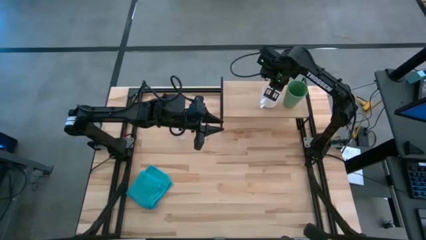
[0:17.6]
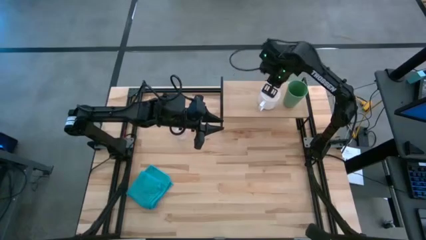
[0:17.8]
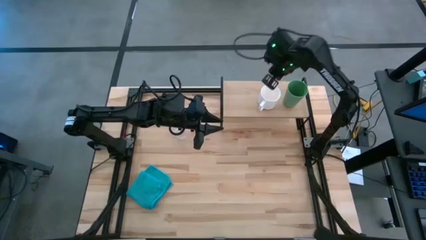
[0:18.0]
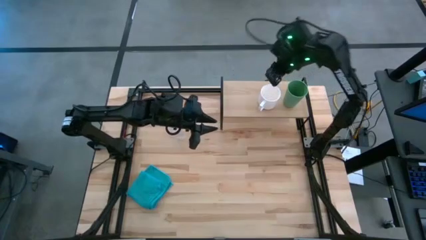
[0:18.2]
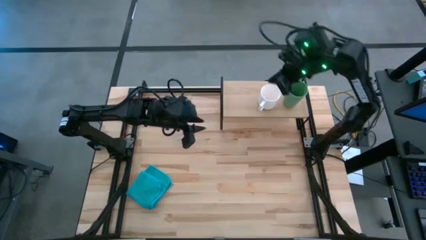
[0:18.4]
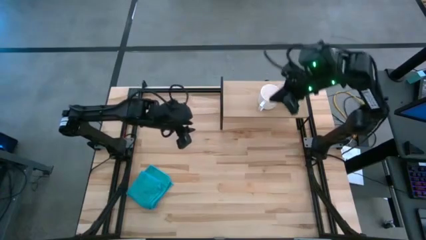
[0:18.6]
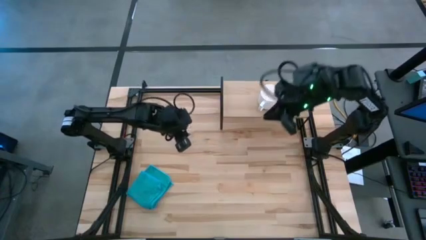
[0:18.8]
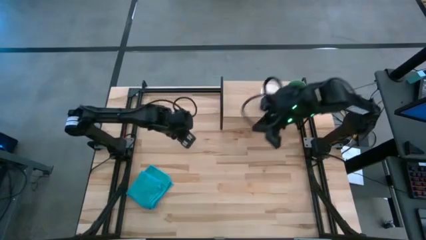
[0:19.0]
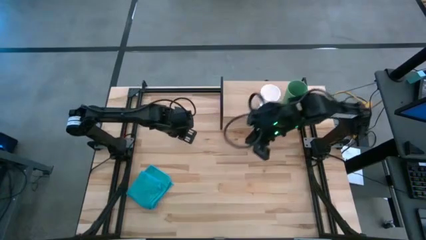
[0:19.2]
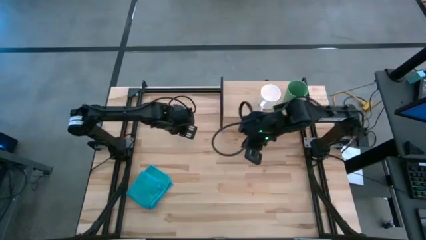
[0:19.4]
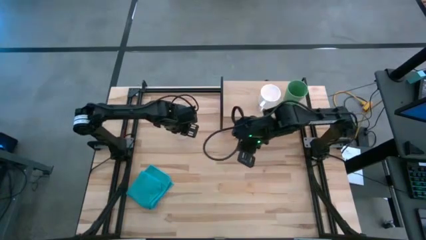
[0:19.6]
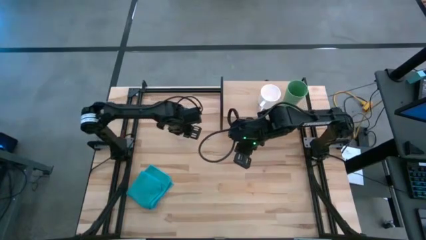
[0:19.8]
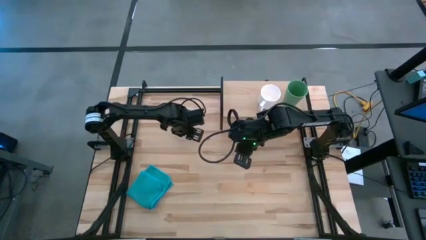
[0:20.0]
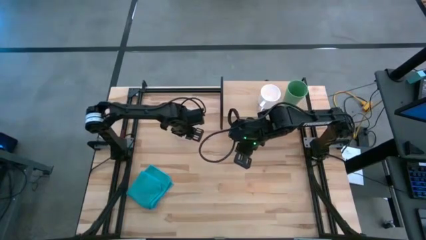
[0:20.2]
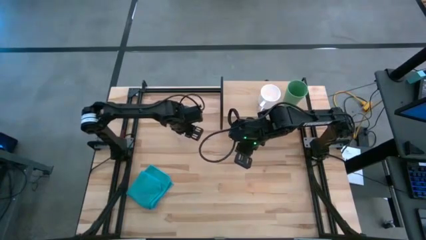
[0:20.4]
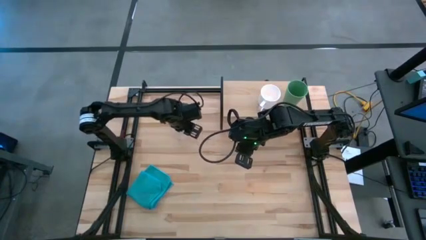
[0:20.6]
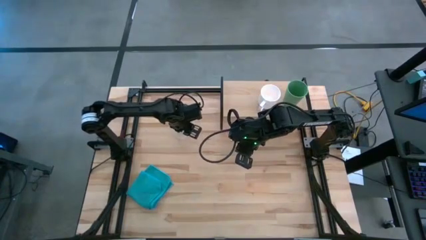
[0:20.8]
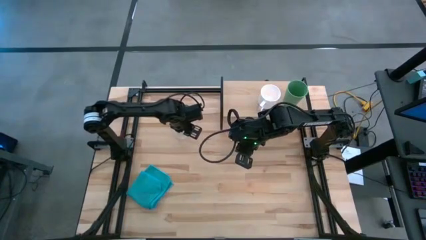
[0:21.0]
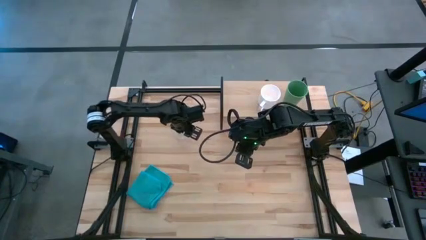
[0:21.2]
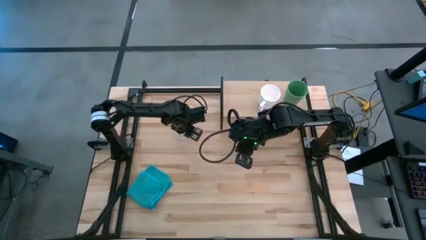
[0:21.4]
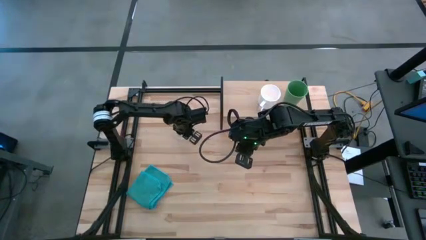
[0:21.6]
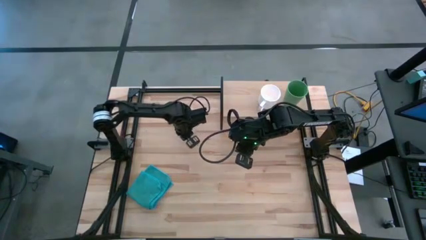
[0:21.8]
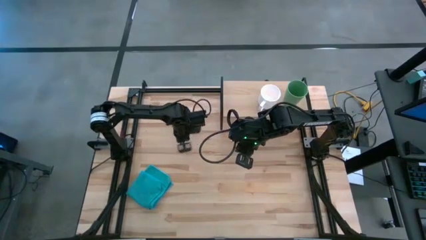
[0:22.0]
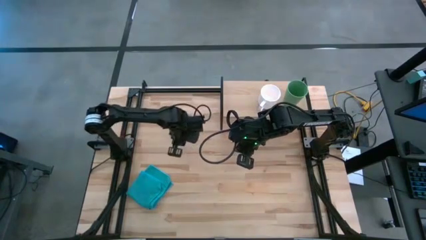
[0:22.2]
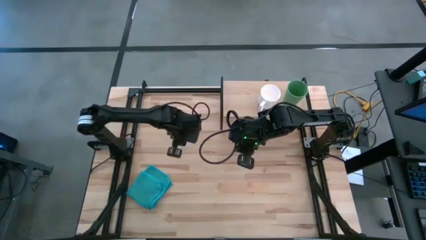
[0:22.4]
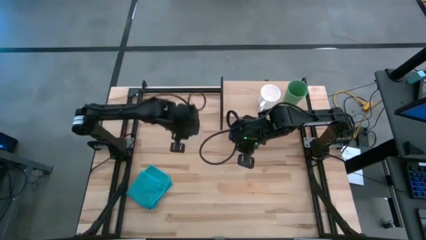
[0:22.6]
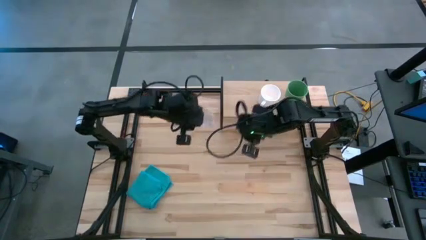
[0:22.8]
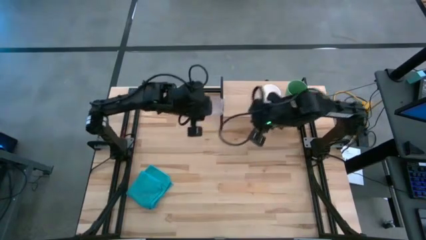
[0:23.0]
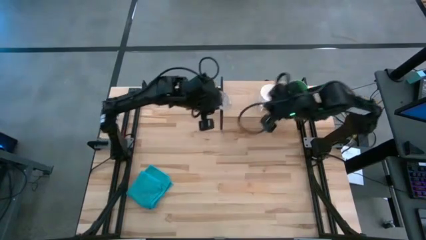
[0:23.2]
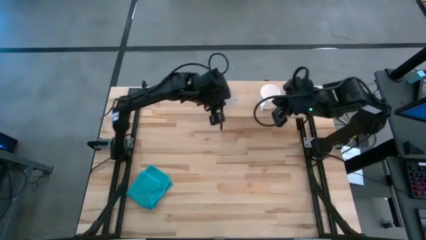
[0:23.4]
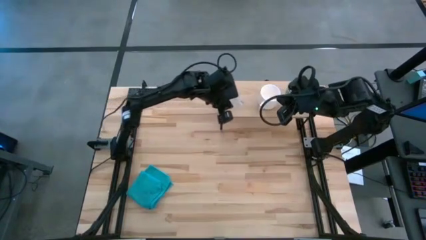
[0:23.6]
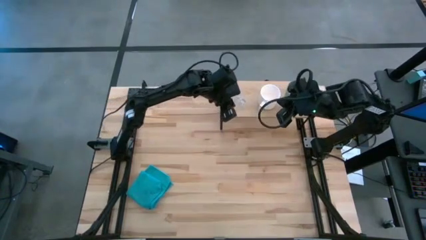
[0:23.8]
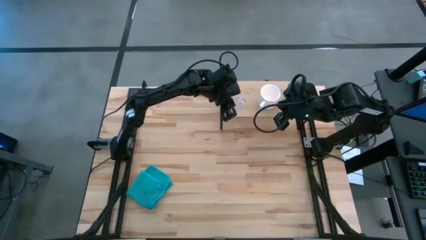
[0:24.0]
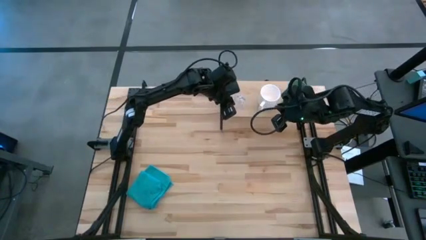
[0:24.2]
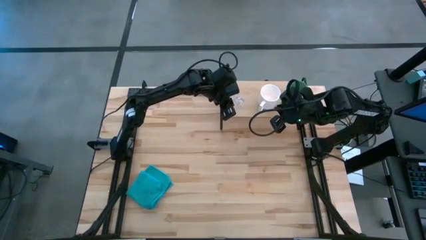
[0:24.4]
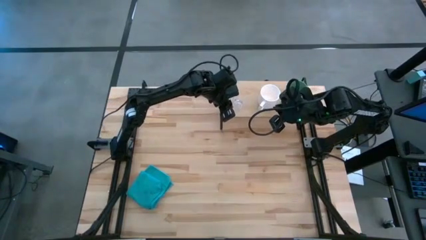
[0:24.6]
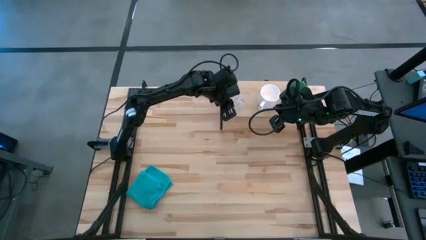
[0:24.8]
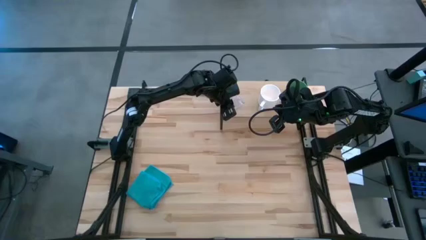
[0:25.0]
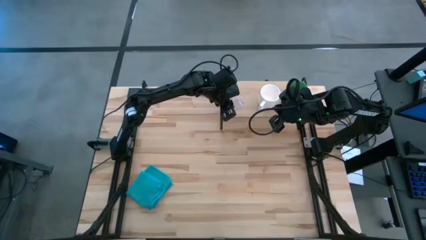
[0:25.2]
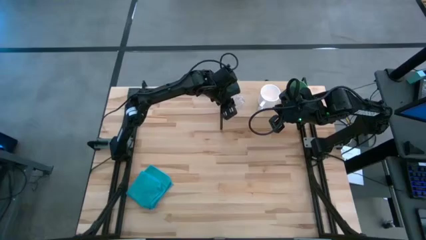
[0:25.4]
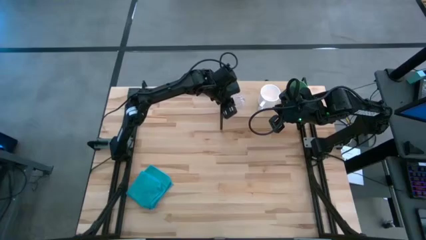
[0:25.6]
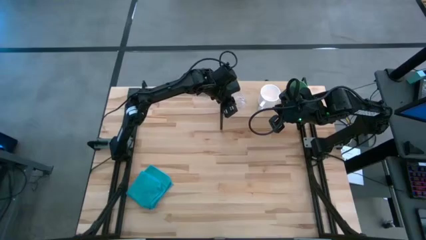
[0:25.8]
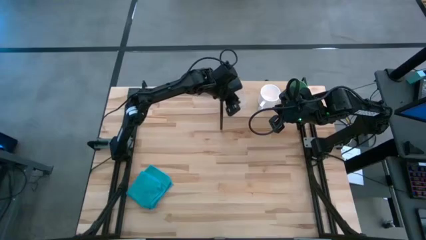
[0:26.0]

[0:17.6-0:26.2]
Task: Stack small to large cups/mugs on shelf
Put the transparent mug on the shelf

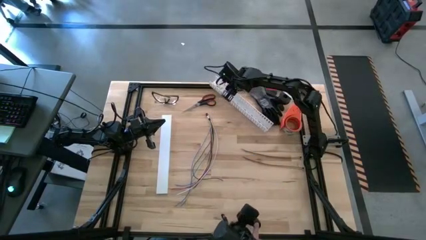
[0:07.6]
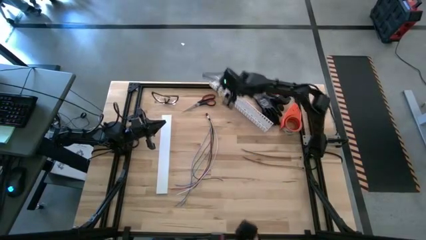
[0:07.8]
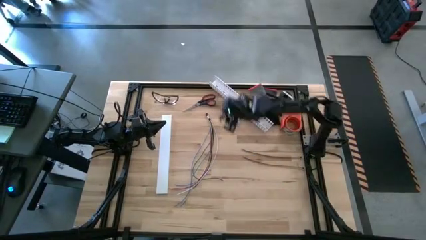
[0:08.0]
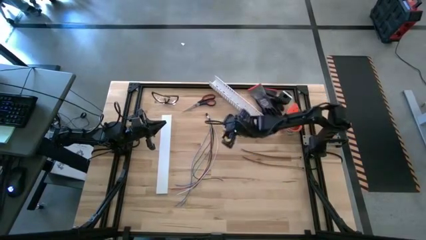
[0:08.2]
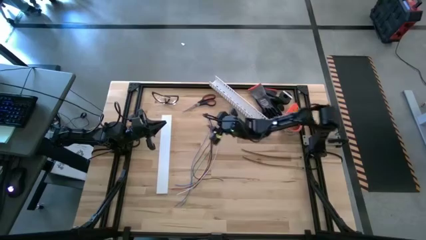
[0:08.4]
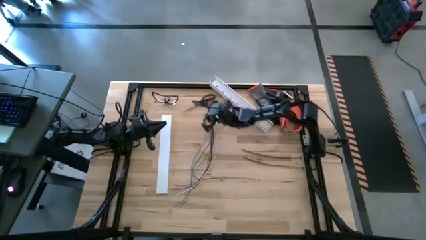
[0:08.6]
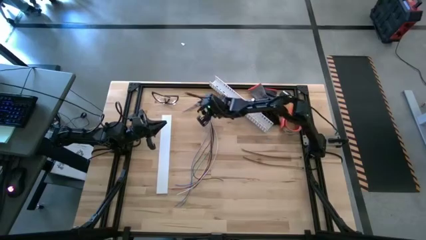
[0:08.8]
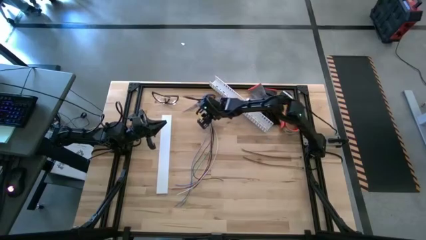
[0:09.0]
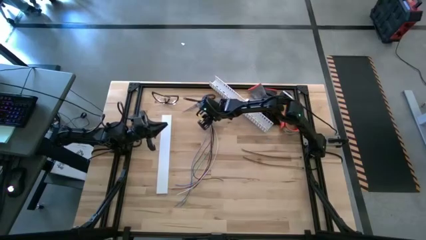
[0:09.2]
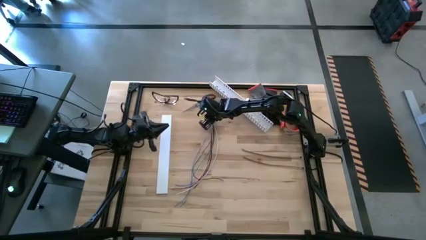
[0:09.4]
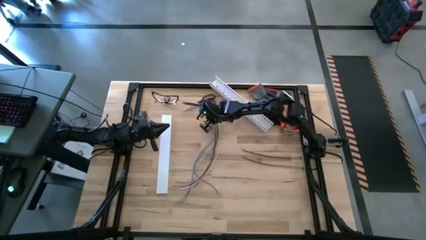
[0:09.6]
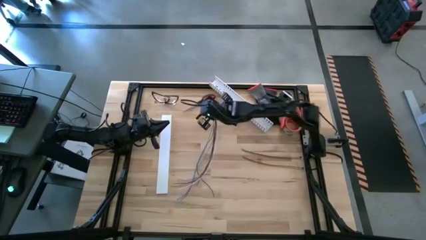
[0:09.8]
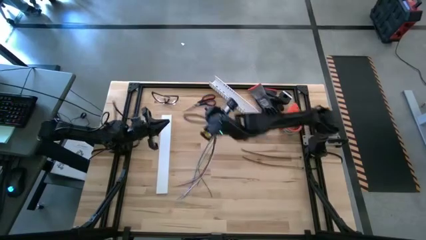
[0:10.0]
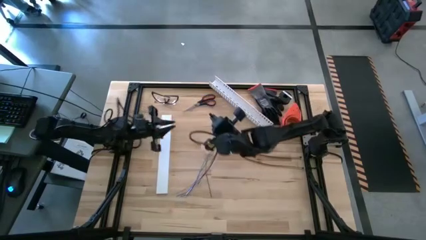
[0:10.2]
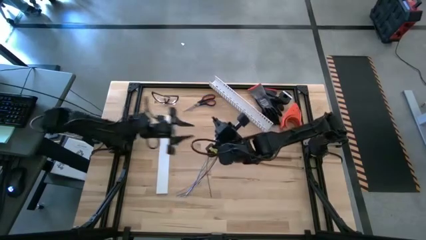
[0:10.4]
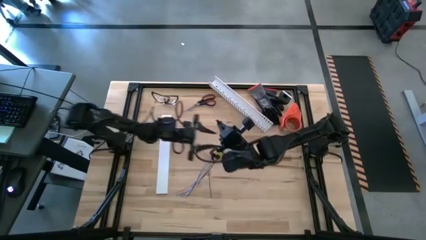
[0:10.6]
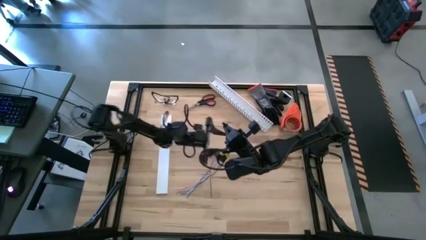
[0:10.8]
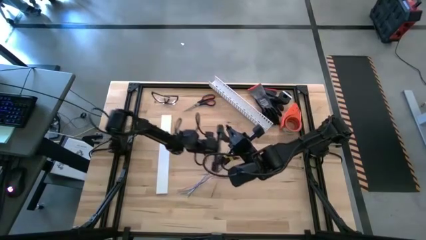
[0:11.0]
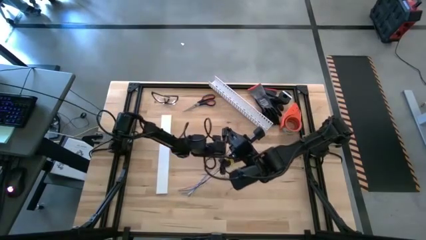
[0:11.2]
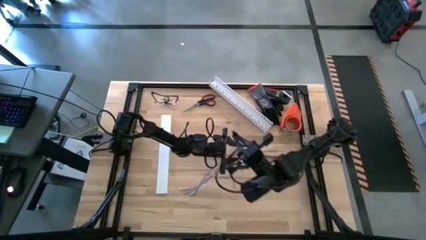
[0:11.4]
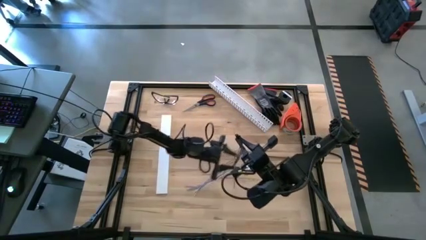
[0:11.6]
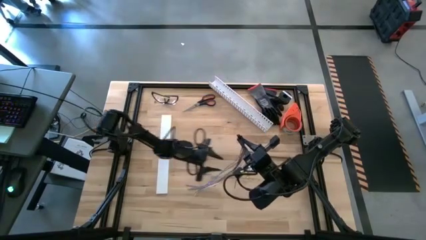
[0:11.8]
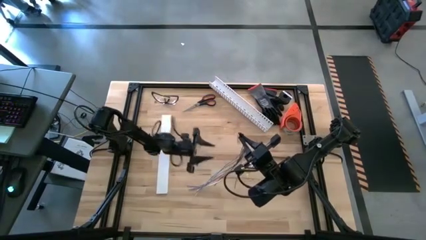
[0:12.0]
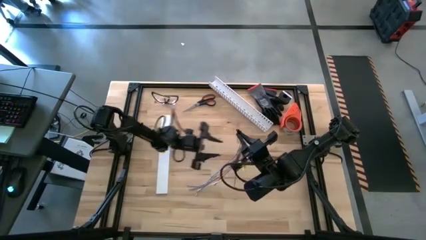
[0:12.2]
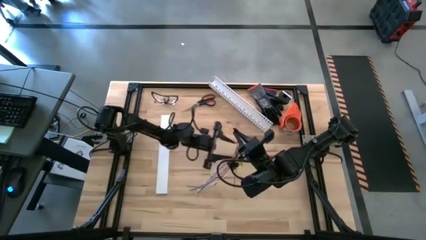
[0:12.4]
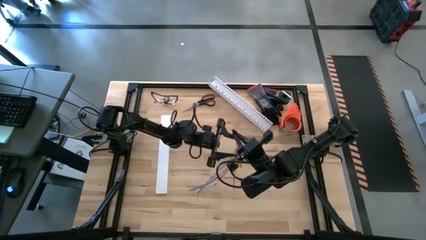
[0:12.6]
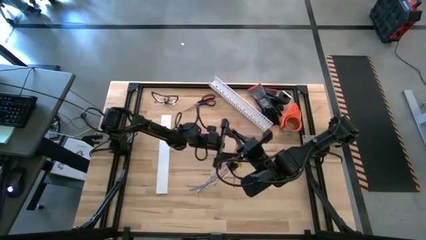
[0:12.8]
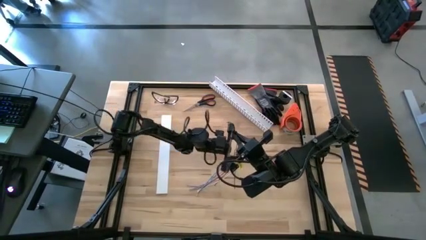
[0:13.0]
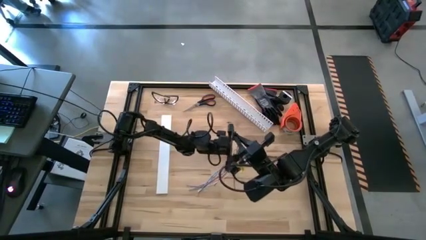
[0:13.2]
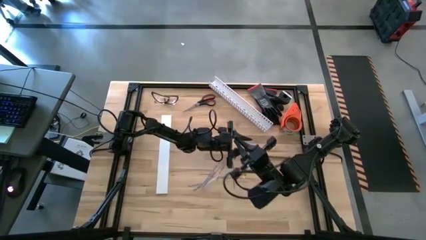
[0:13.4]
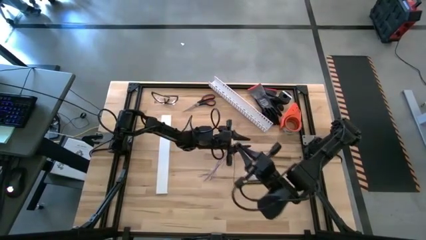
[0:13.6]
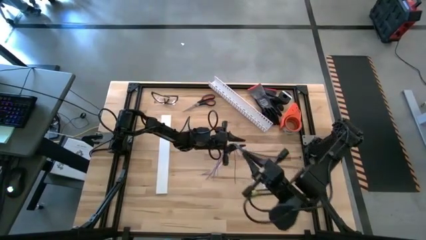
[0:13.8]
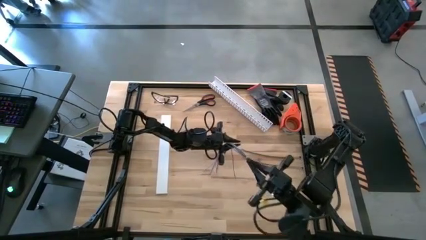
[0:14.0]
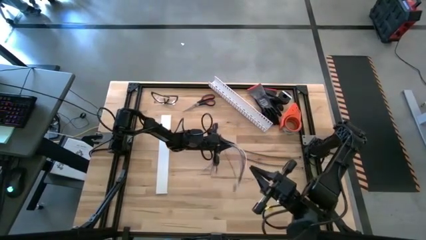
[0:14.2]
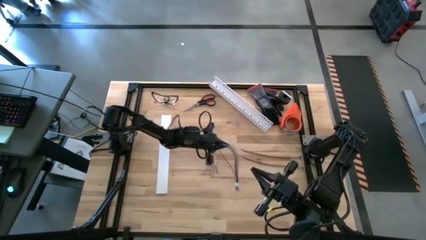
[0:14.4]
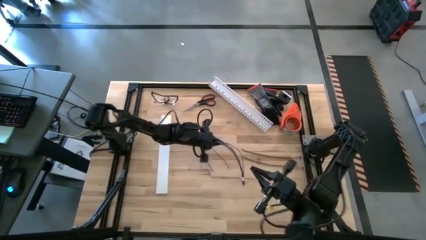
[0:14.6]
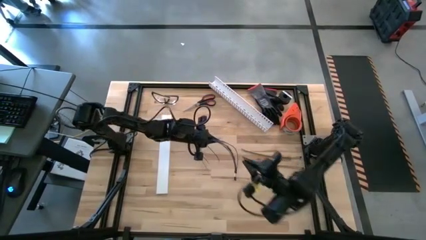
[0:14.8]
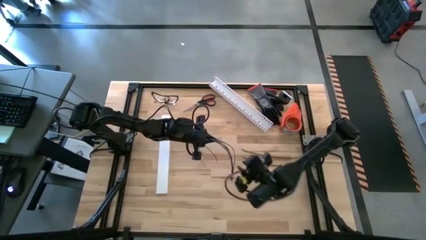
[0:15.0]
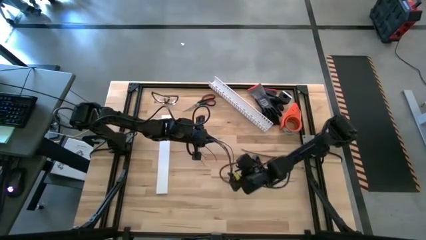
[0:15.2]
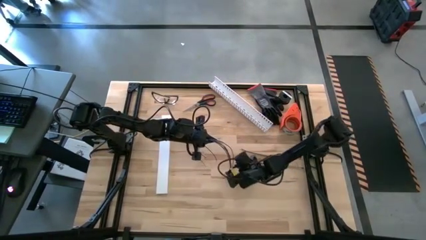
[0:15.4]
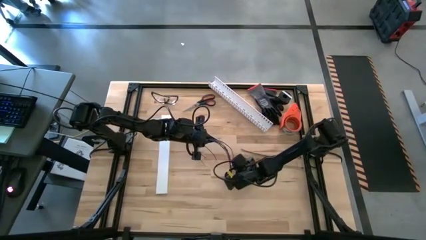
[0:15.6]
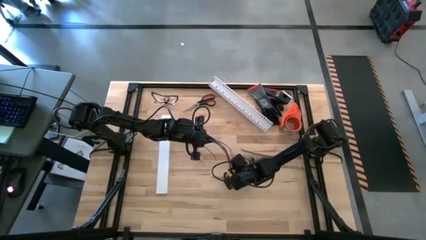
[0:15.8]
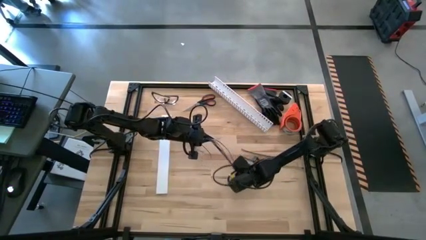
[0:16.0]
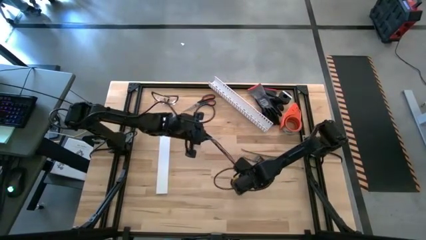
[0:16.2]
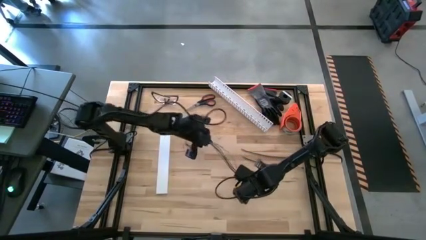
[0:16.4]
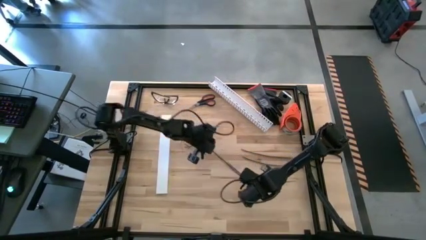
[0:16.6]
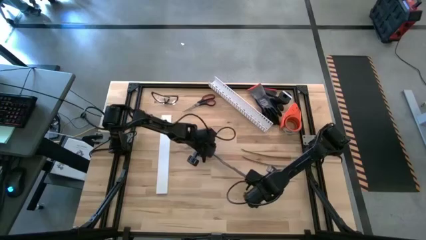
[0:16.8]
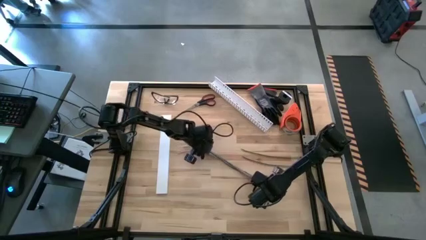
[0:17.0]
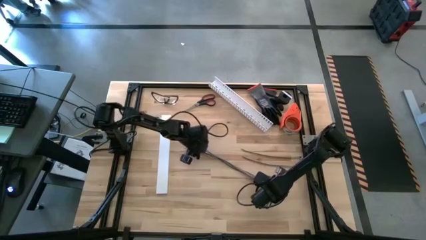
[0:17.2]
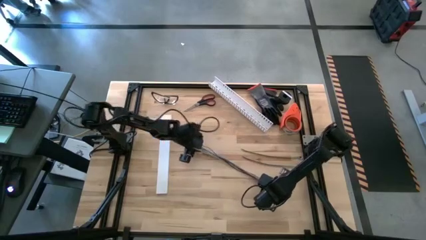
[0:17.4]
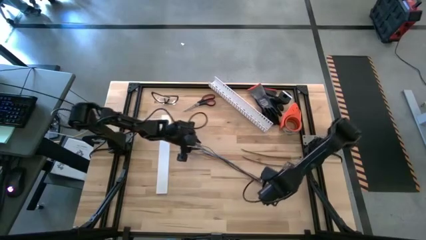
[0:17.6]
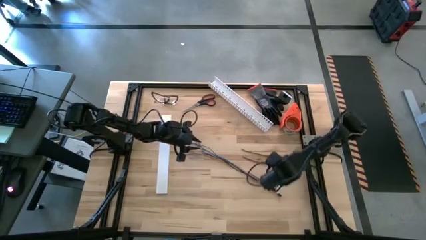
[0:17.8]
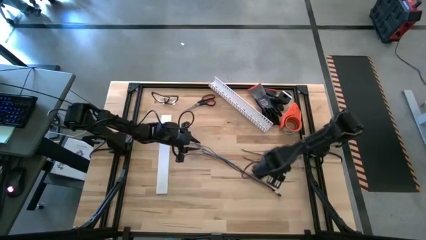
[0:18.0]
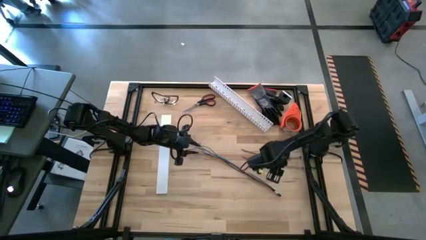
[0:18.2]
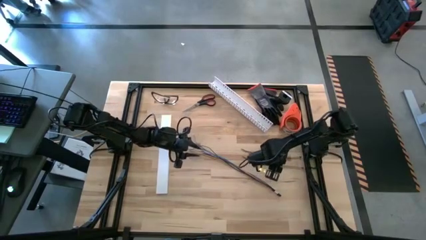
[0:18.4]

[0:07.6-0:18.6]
Task: Ziptie cables
Wrap the bottom black zip tie on the cable wires
